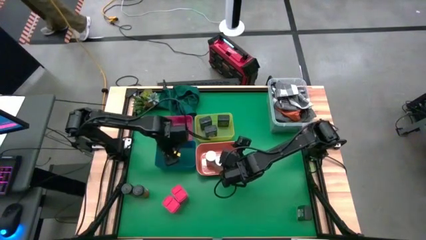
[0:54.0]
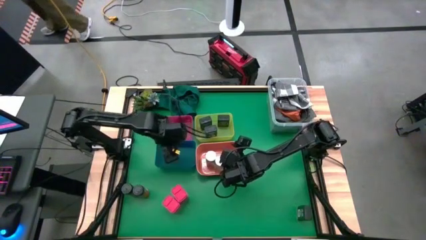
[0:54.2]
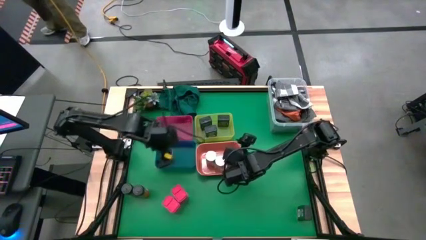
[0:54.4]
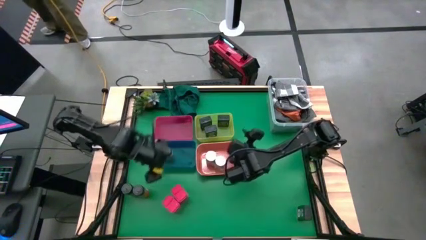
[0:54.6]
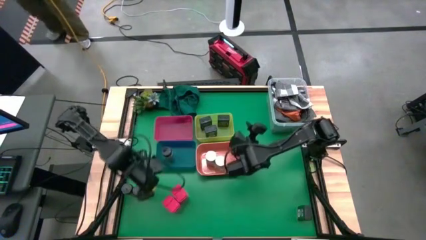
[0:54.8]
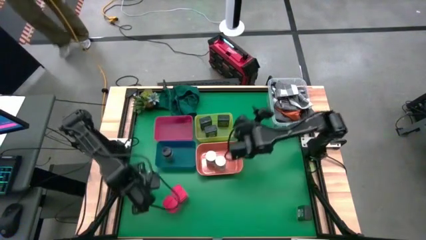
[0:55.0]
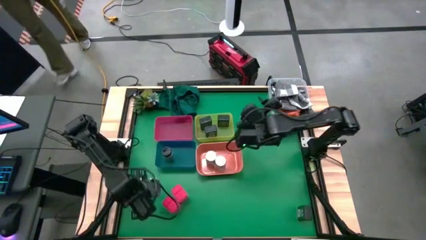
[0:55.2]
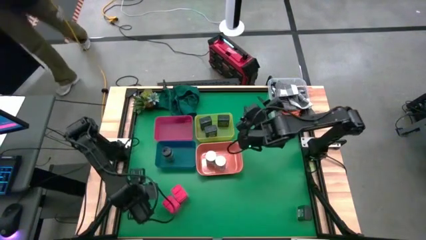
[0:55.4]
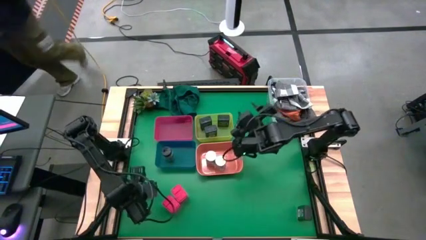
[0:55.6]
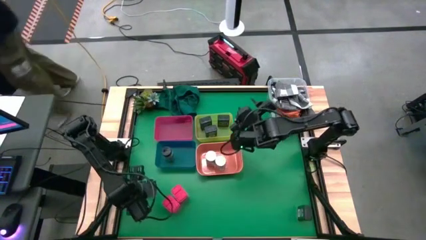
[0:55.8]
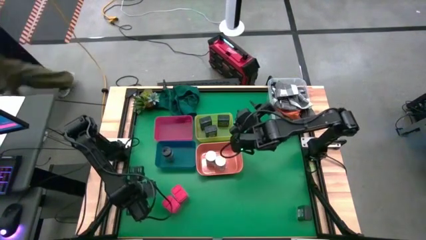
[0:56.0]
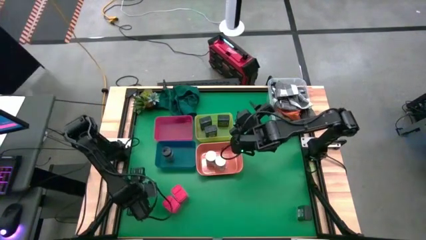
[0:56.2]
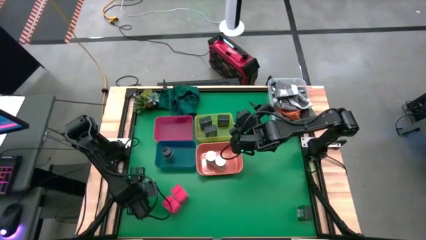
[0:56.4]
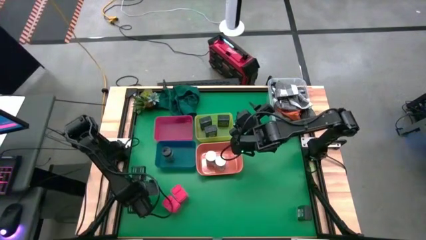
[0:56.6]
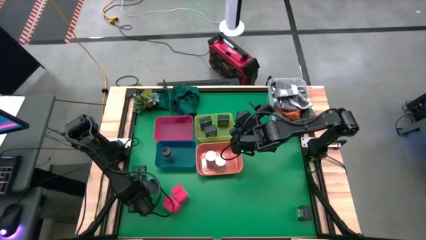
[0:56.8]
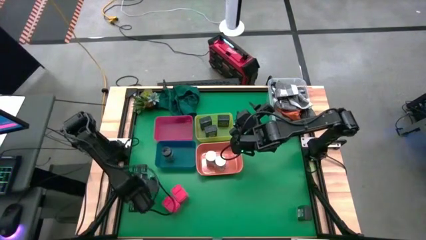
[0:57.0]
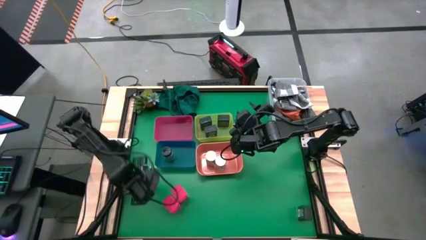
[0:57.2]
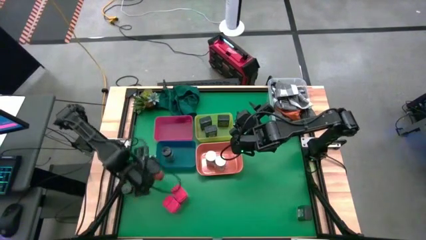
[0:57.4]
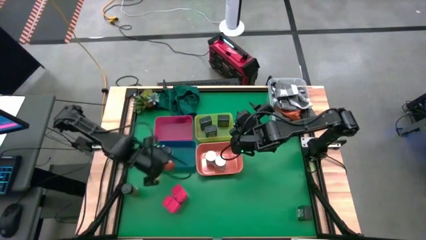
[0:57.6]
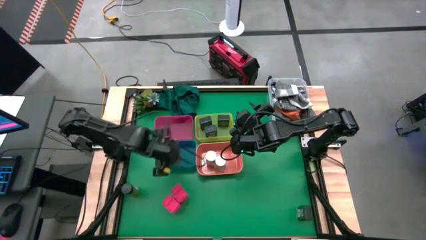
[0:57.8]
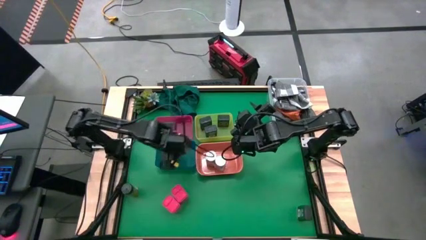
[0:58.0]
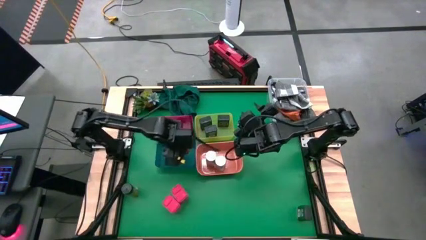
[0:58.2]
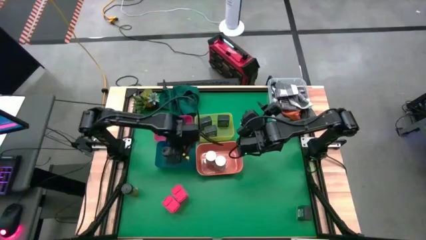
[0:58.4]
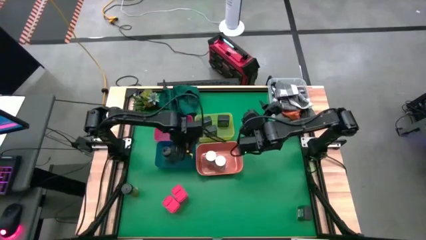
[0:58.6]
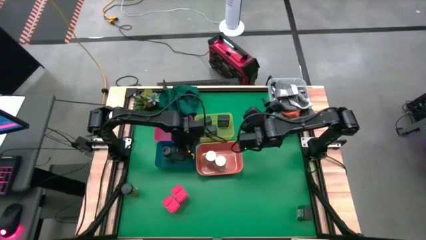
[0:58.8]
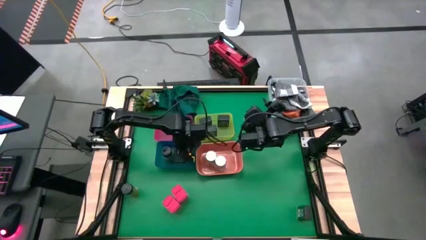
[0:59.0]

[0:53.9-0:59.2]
Task: Sort spices by type
Put the right black seasoning bottle into the blue bin

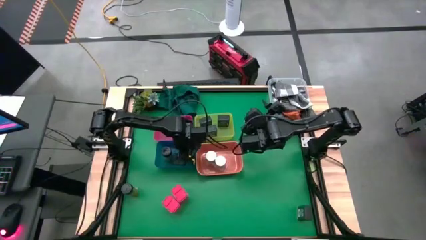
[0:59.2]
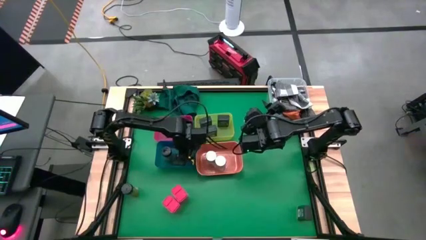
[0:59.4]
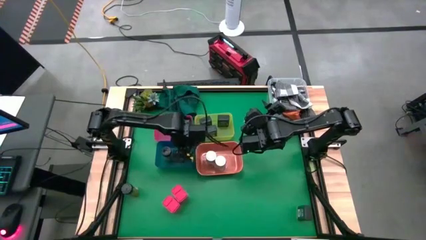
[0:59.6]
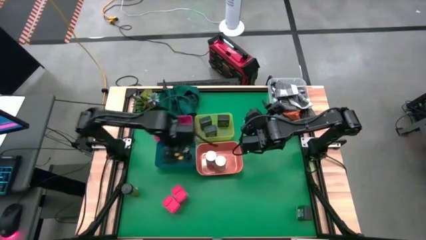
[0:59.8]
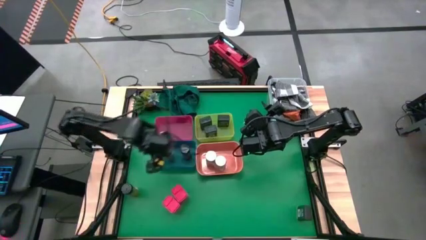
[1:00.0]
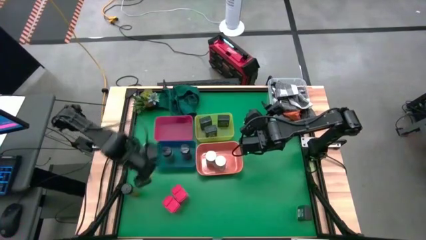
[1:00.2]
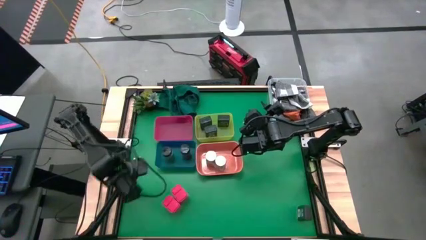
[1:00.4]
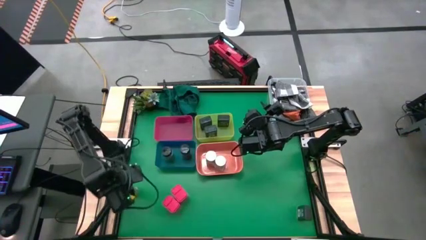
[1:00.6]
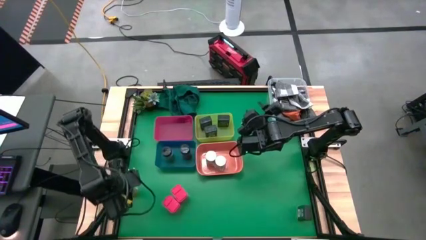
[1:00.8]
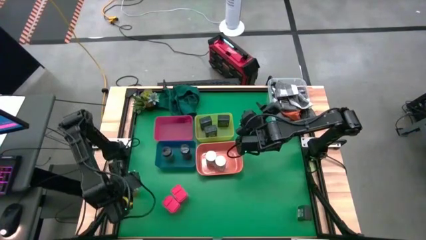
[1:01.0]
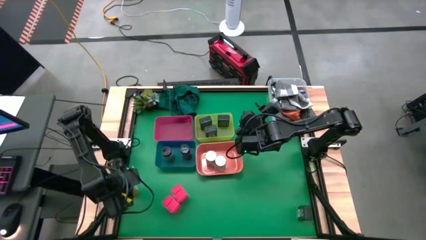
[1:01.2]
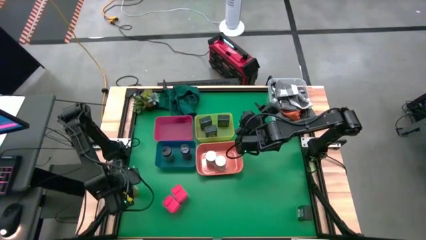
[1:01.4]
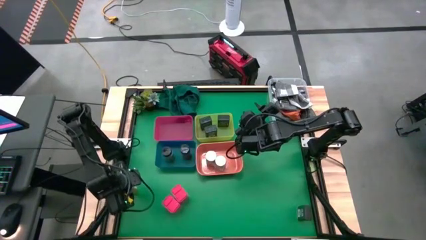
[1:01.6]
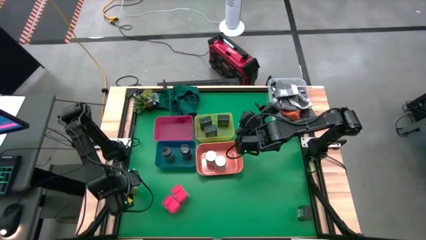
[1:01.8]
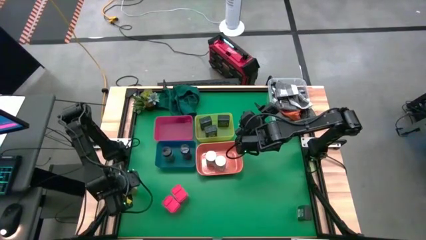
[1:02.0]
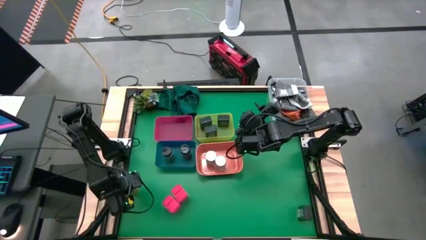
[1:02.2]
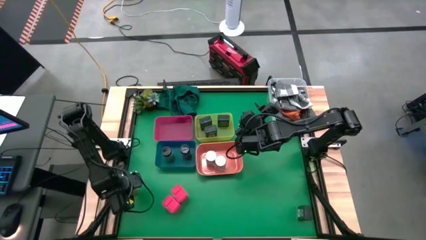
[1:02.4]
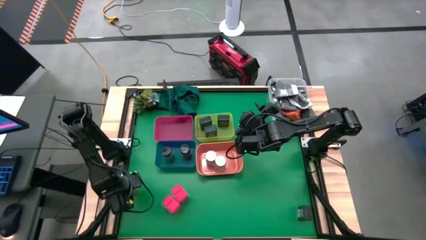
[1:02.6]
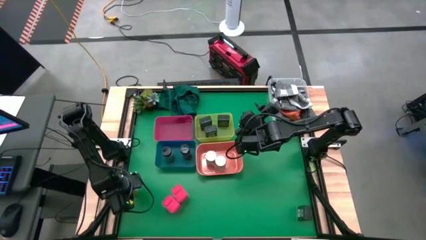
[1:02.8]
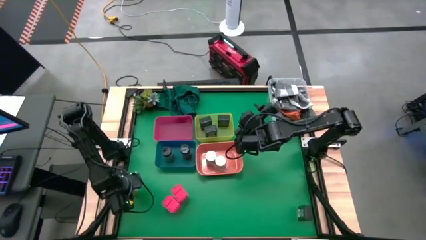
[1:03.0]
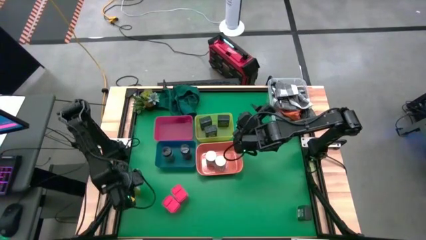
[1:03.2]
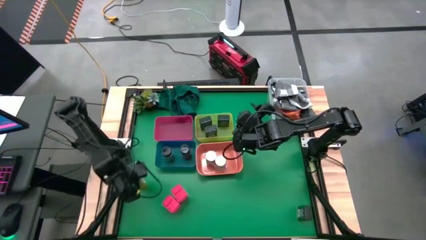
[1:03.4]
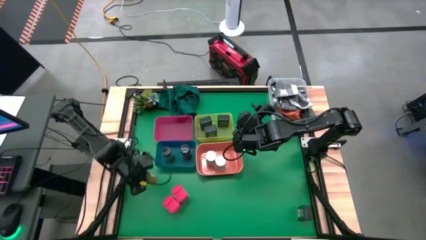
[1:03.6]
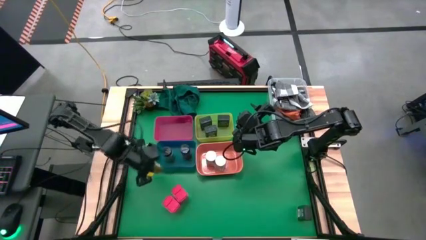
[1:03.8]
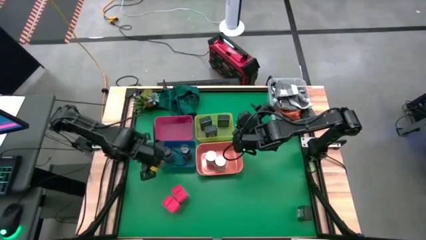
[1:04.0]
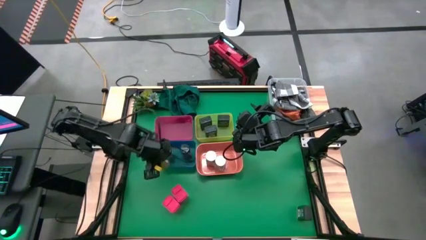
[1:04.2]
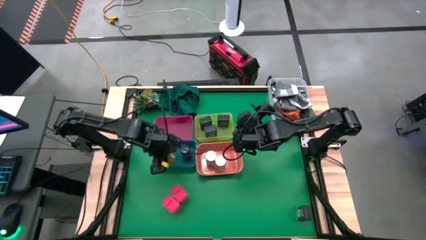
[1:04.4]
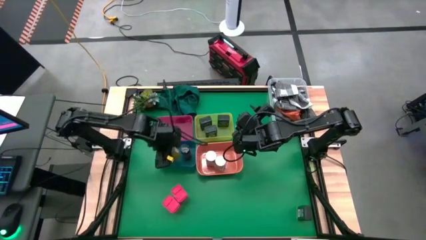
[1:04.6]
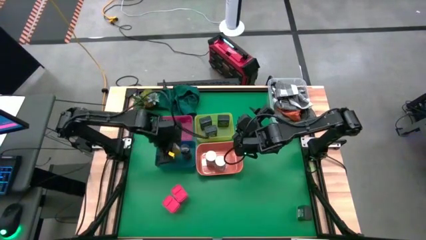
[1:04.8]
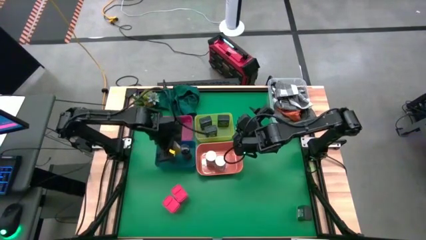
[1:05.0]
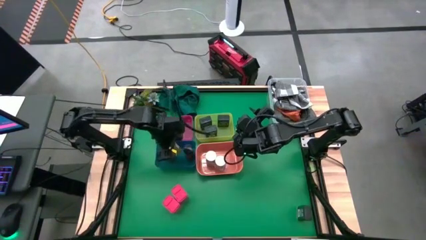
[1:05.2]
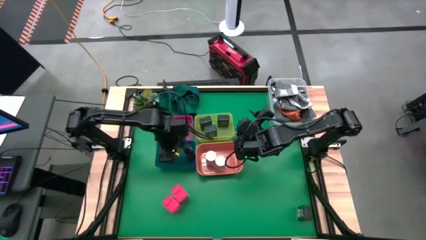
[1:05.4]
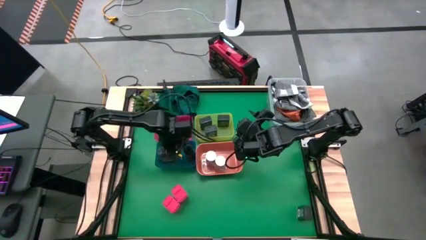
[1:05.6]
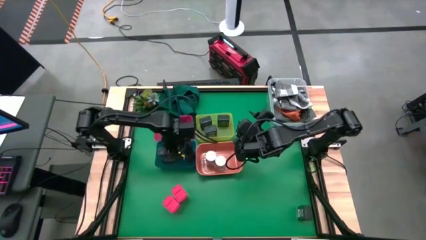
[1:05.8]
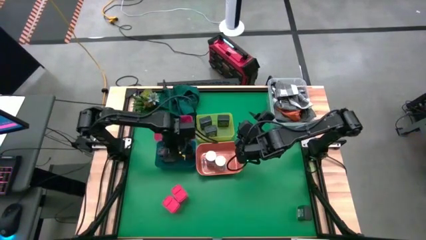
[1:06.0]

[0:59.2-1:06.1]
Put the black seasoning bottle into the blue bin

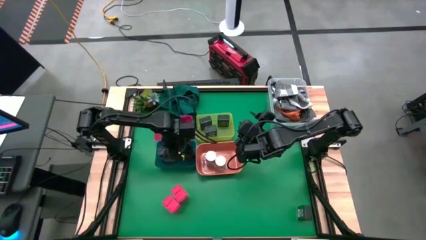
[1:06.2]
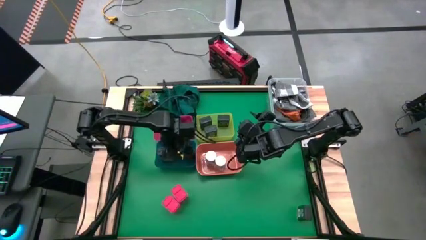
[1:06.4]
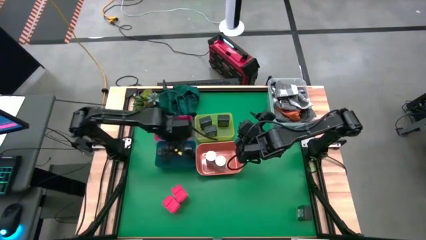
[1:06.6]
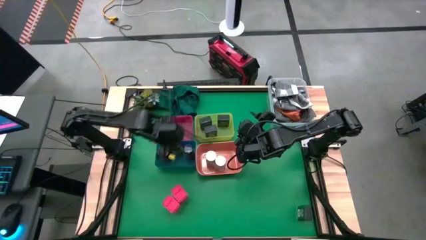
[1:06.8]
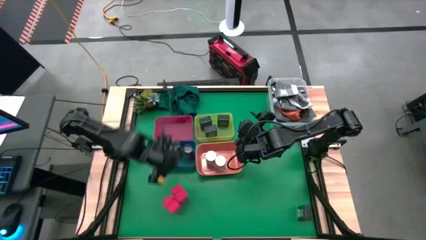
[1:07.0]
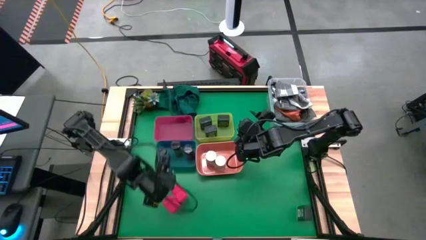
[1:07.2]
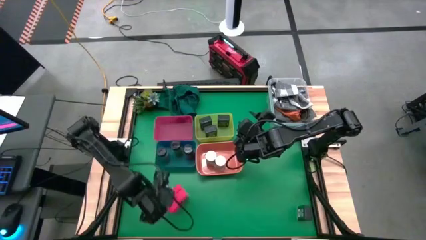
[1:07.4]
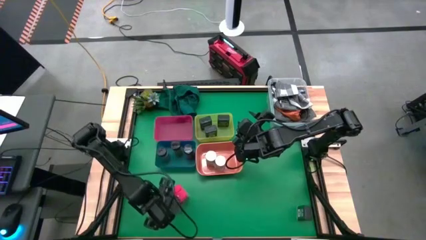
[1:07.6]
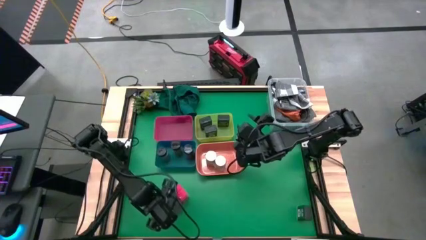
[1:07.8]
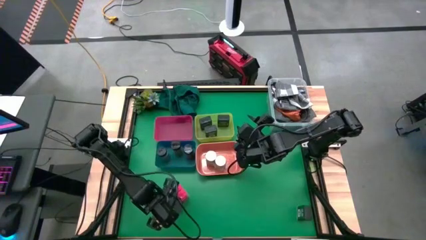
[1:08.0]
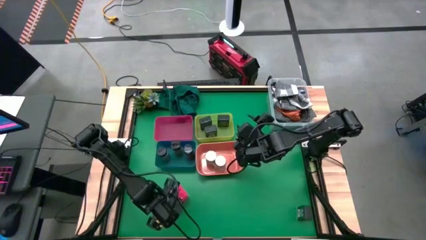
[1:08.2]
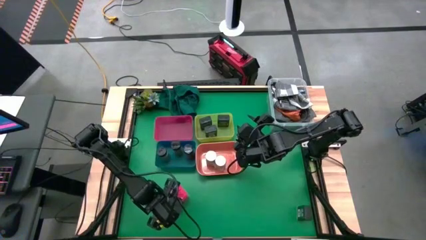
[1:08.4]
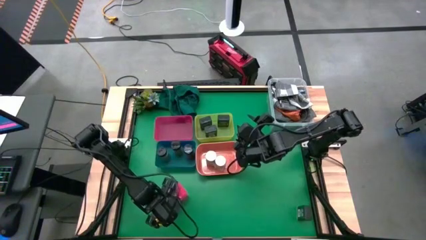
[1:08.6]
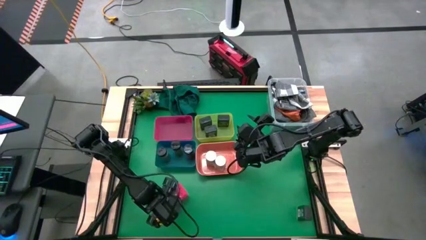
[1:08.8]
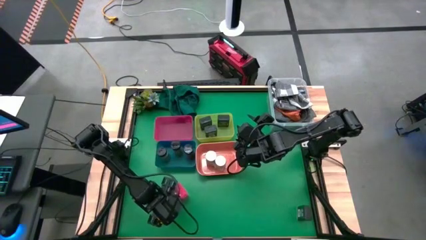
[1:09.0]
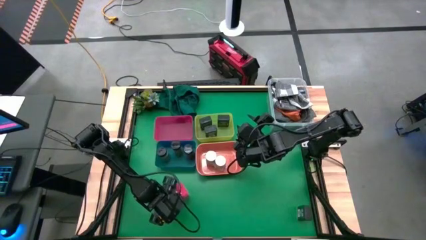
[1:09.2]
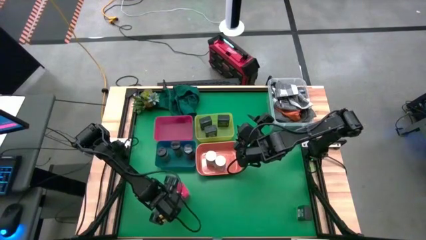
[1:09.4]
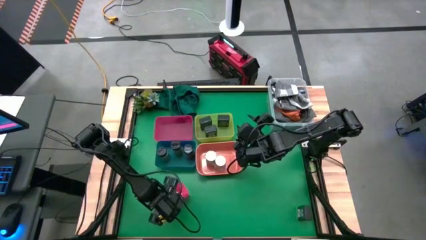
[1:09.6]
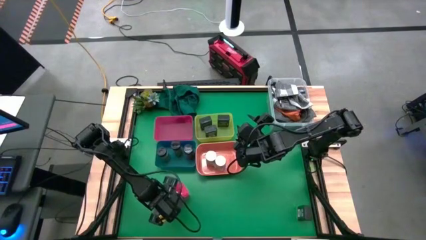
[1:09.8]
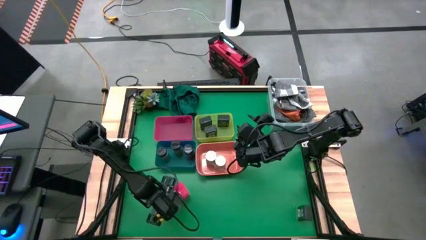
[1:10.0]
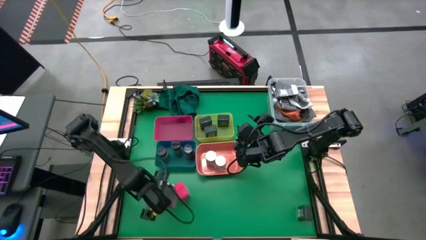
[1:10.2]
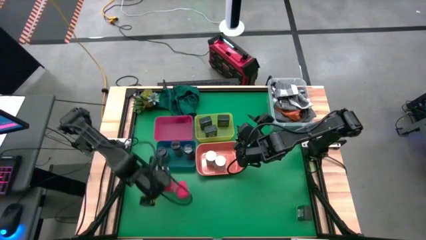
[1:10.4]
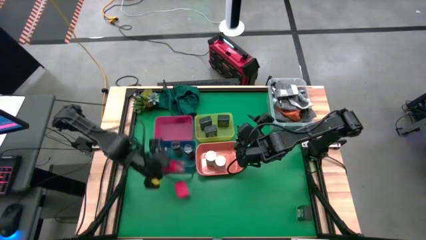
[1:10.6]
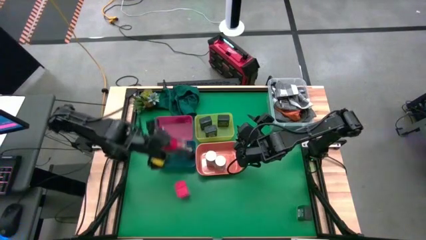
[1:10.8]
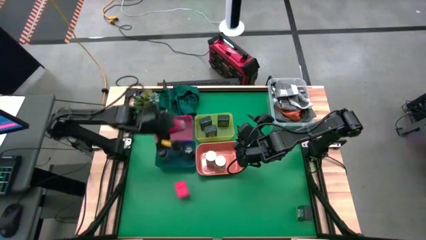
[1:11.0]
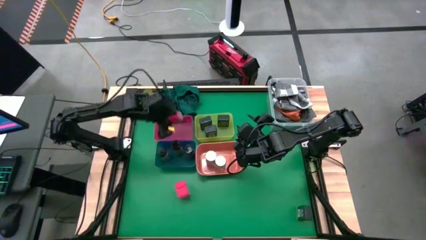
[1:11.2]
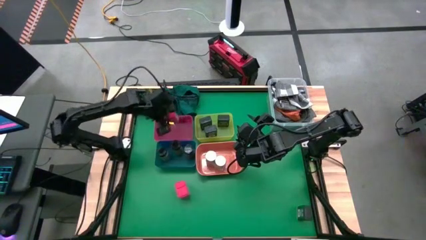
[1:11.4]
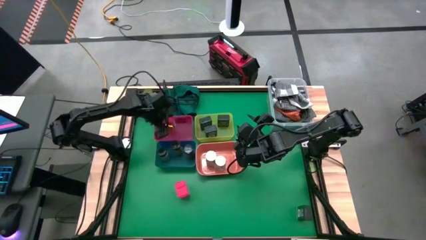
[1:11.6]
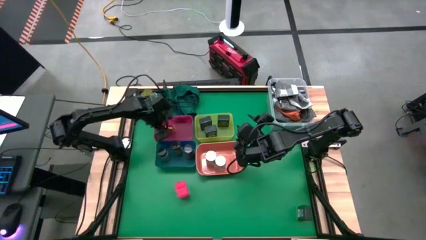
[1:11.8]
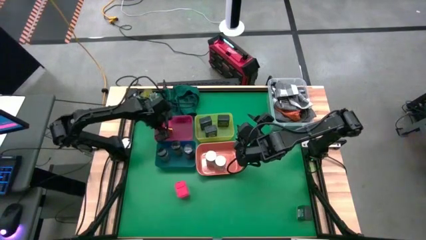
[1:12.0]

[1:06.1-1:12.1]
Put the bottom red seasoning can into the pink bin
